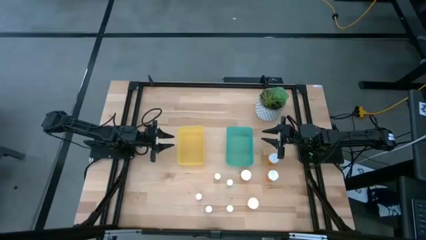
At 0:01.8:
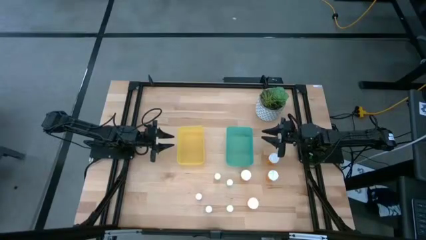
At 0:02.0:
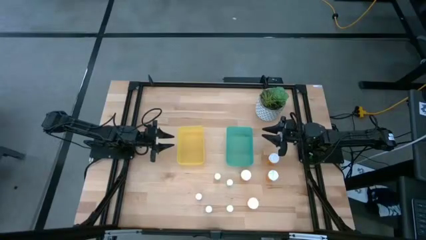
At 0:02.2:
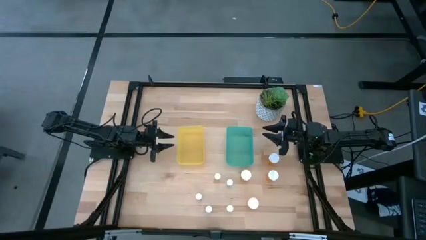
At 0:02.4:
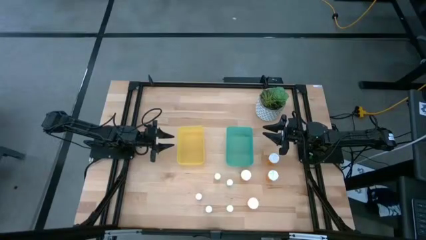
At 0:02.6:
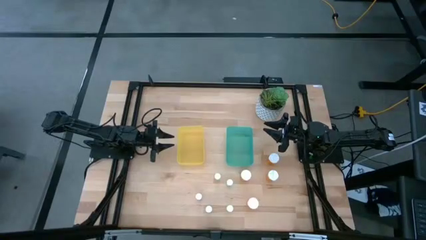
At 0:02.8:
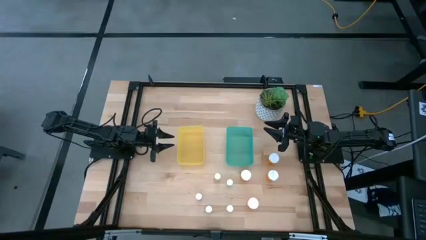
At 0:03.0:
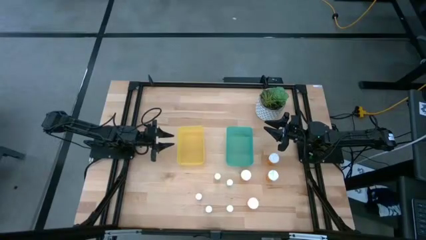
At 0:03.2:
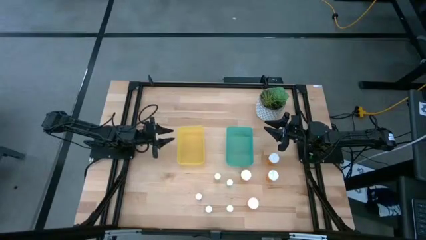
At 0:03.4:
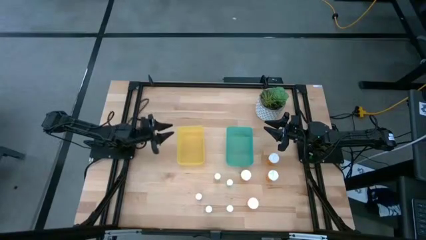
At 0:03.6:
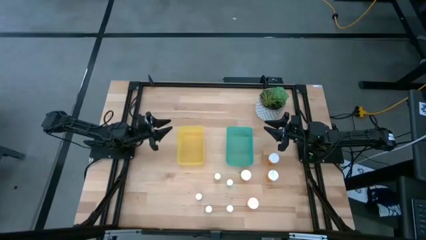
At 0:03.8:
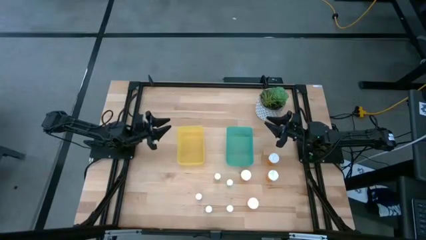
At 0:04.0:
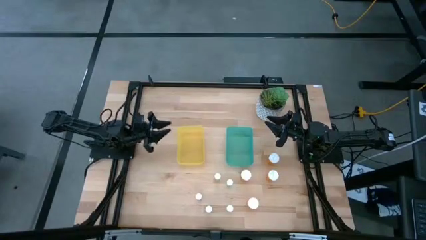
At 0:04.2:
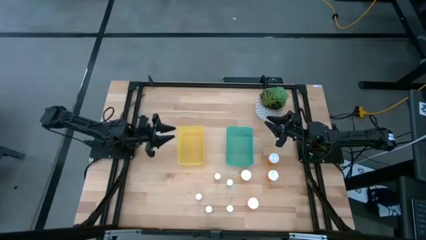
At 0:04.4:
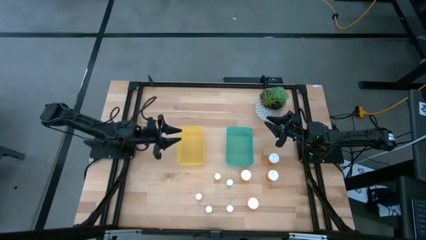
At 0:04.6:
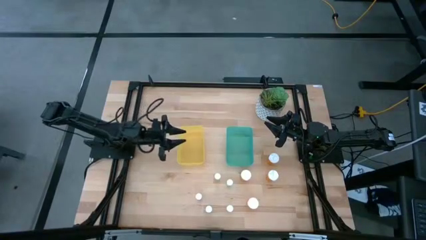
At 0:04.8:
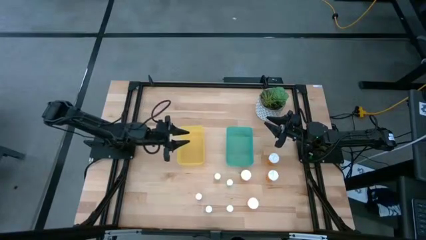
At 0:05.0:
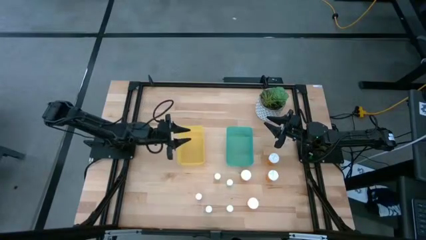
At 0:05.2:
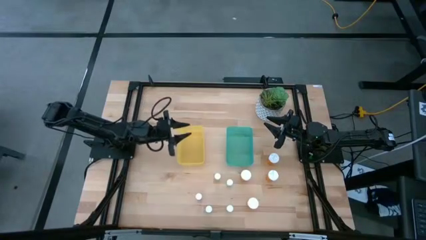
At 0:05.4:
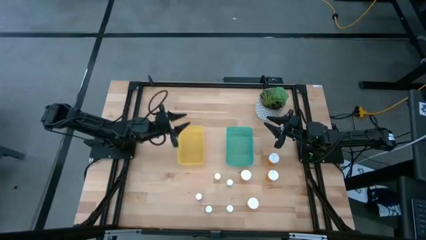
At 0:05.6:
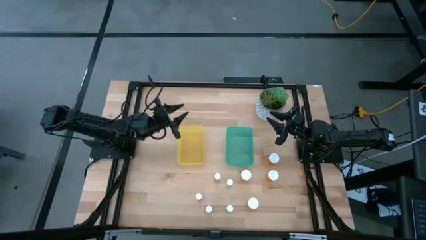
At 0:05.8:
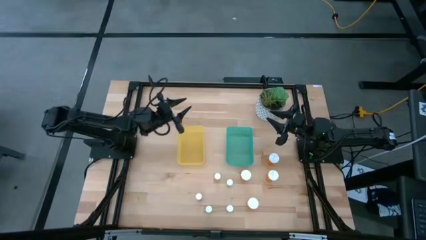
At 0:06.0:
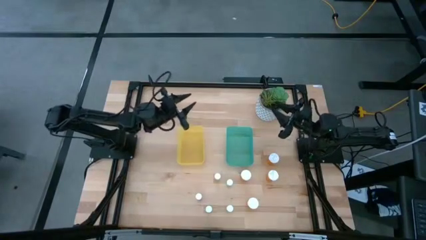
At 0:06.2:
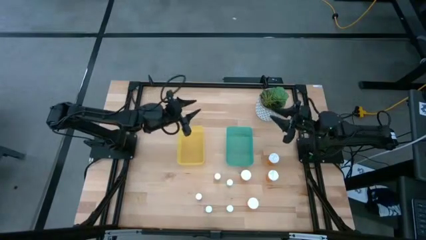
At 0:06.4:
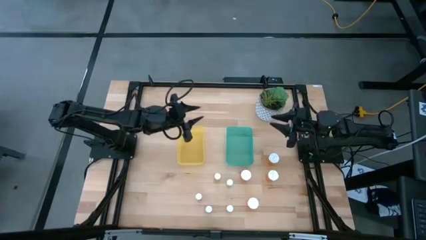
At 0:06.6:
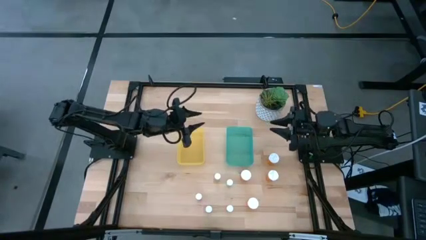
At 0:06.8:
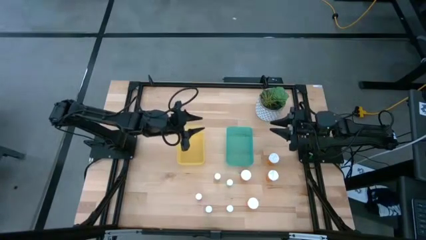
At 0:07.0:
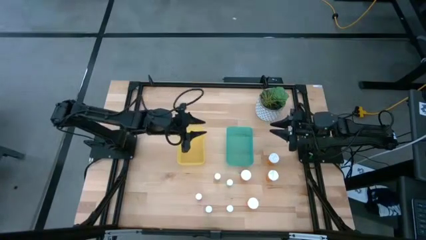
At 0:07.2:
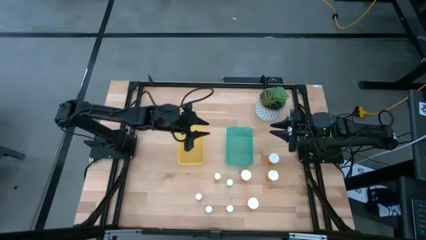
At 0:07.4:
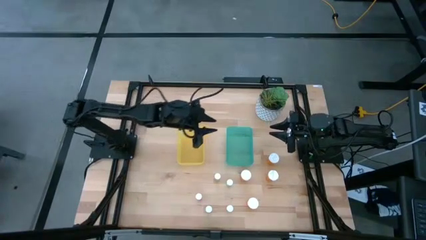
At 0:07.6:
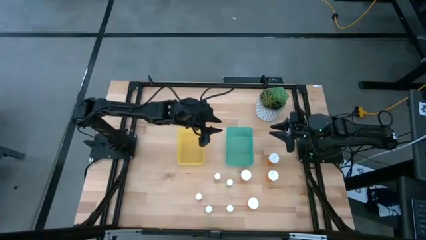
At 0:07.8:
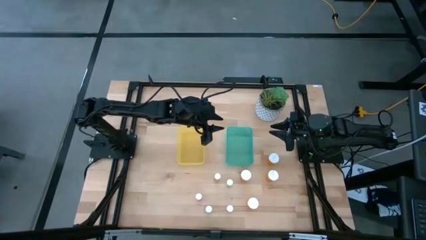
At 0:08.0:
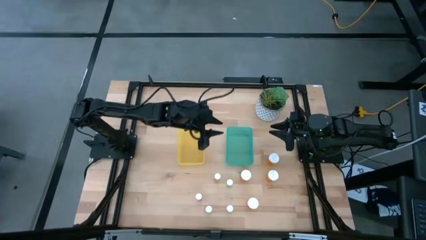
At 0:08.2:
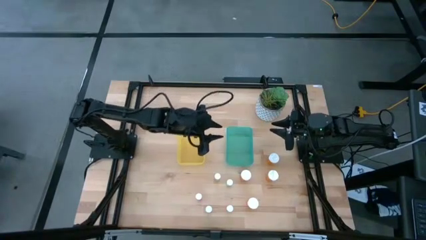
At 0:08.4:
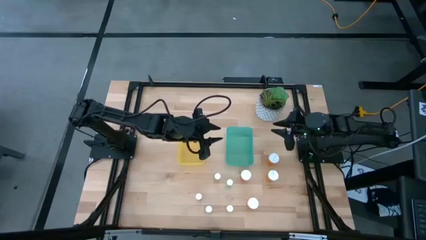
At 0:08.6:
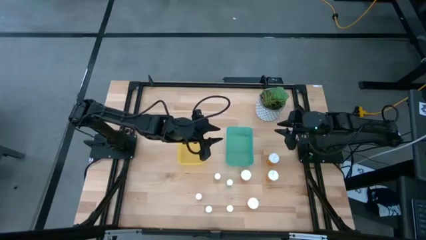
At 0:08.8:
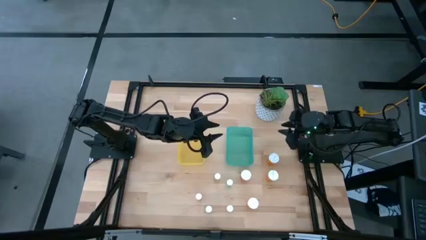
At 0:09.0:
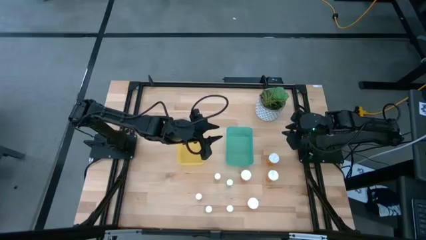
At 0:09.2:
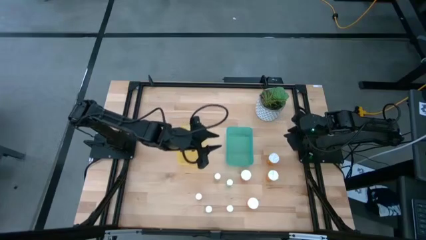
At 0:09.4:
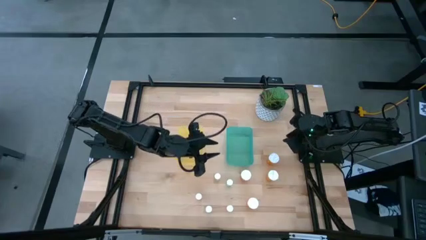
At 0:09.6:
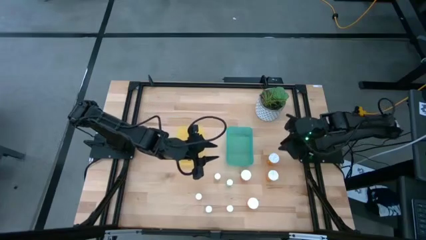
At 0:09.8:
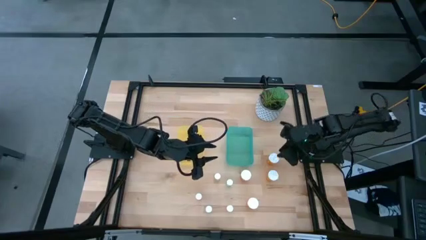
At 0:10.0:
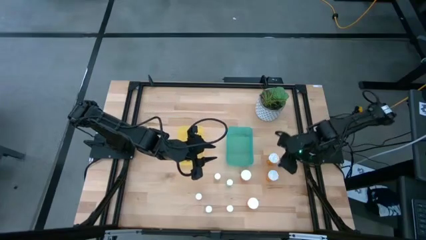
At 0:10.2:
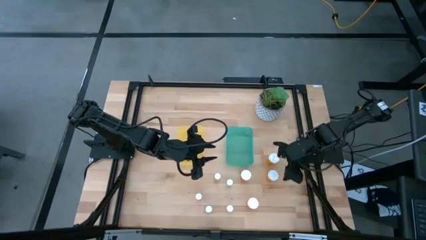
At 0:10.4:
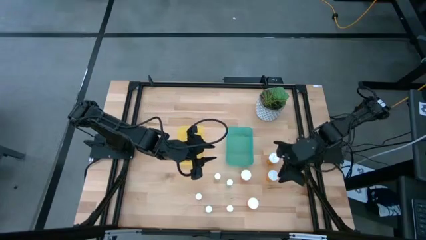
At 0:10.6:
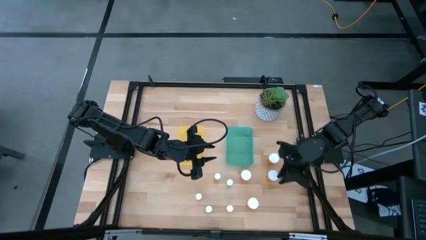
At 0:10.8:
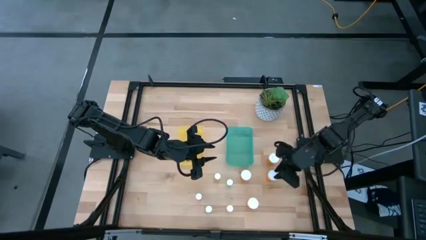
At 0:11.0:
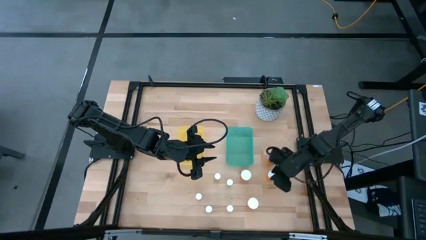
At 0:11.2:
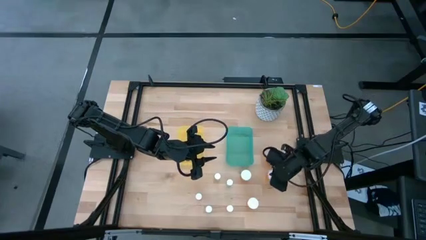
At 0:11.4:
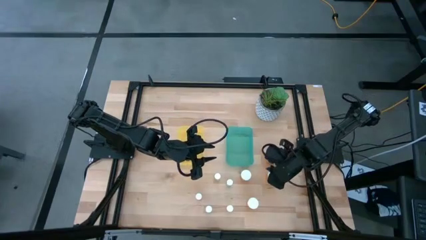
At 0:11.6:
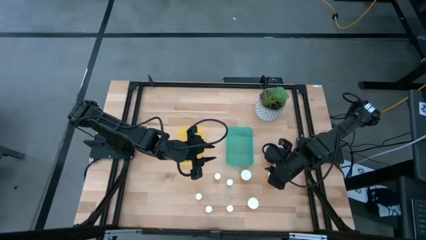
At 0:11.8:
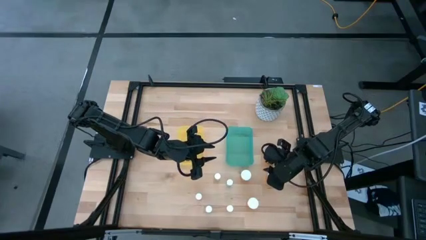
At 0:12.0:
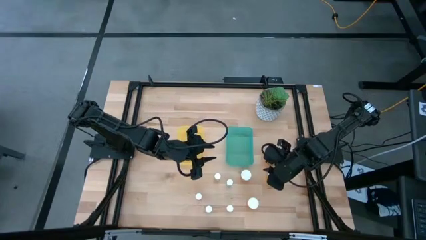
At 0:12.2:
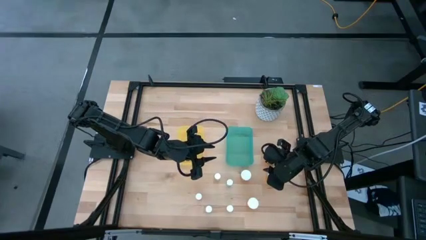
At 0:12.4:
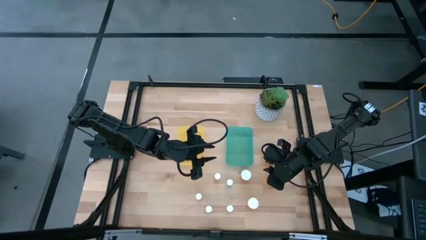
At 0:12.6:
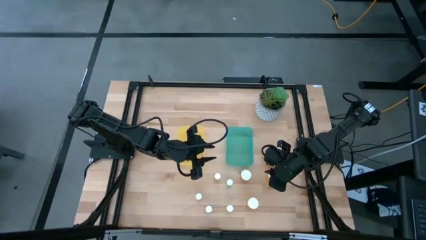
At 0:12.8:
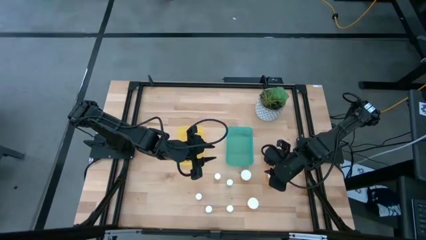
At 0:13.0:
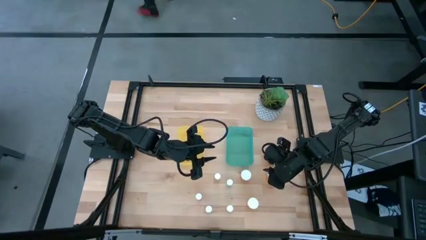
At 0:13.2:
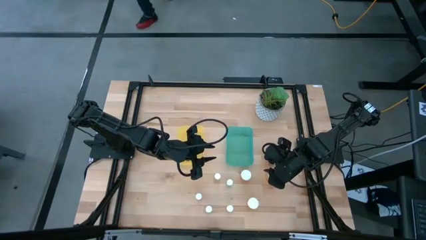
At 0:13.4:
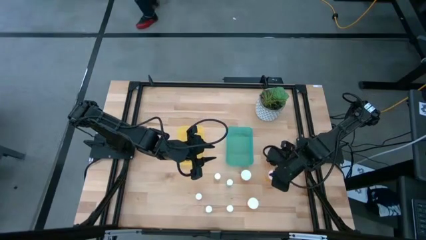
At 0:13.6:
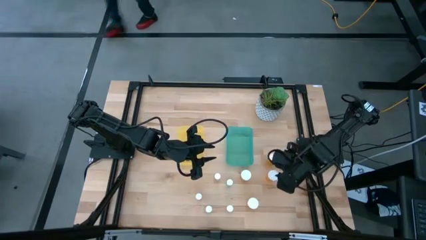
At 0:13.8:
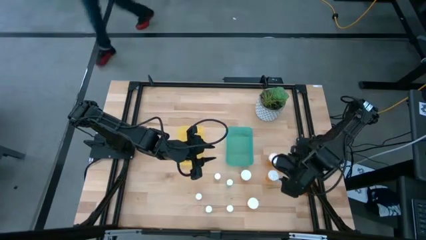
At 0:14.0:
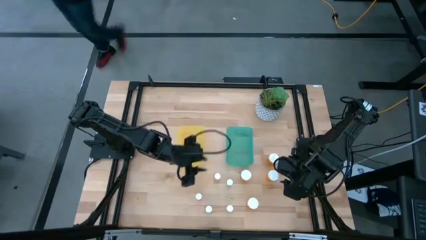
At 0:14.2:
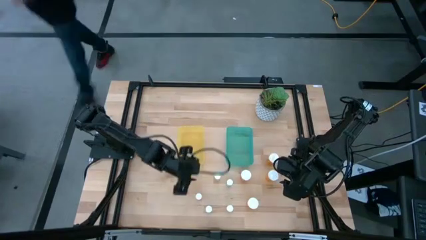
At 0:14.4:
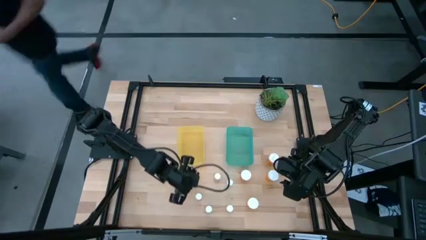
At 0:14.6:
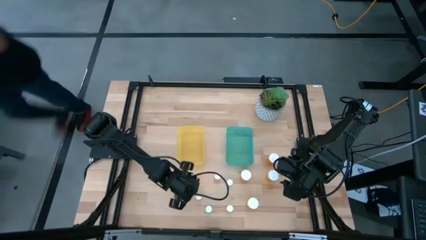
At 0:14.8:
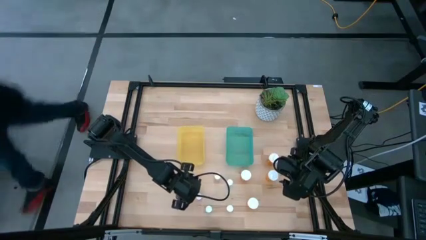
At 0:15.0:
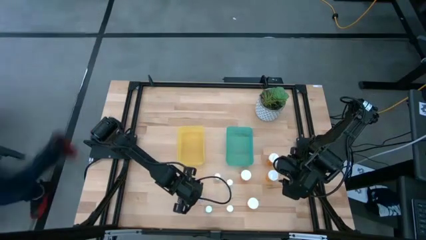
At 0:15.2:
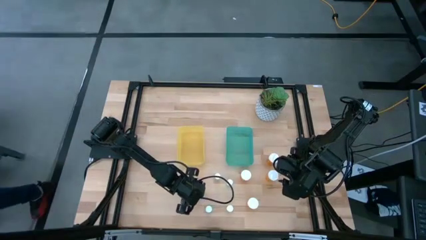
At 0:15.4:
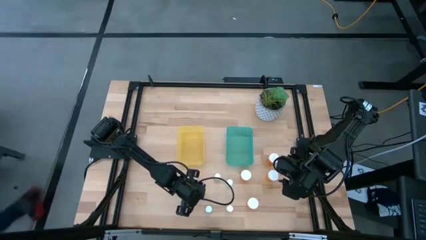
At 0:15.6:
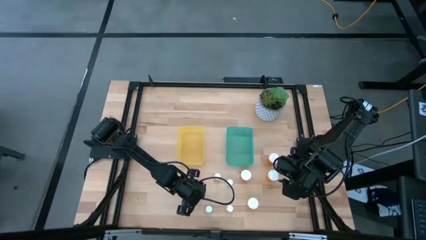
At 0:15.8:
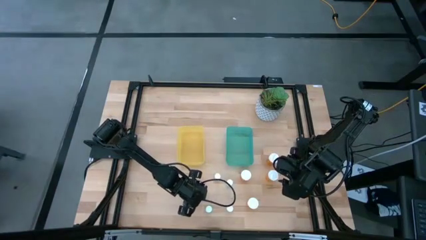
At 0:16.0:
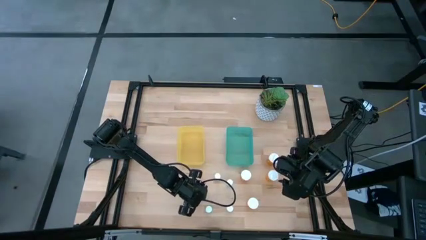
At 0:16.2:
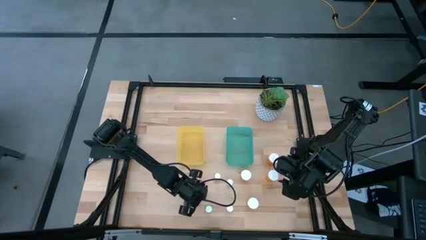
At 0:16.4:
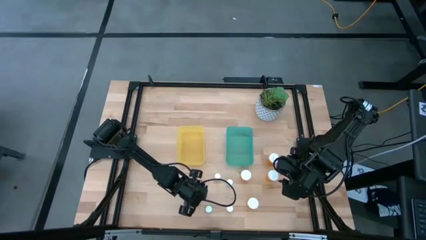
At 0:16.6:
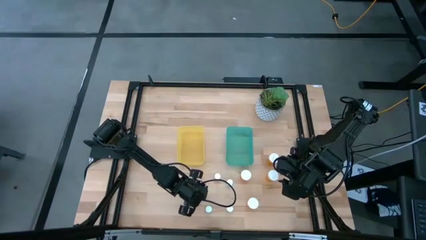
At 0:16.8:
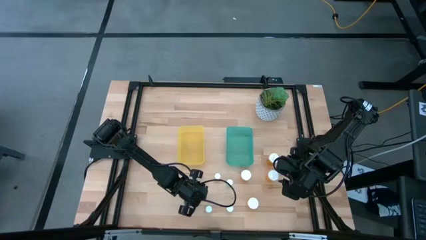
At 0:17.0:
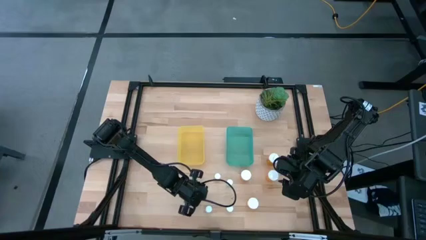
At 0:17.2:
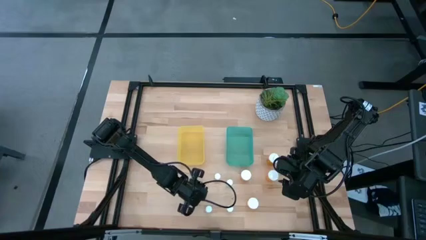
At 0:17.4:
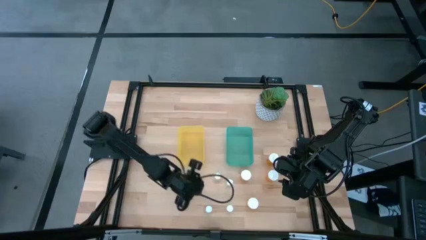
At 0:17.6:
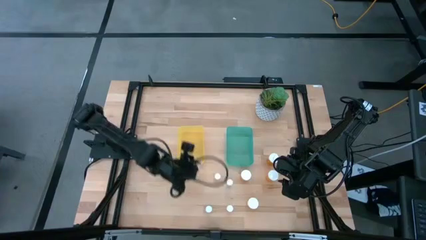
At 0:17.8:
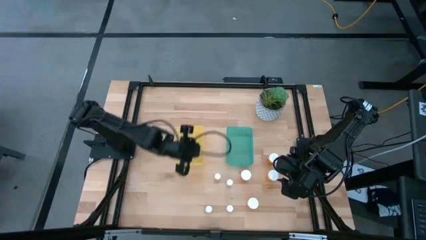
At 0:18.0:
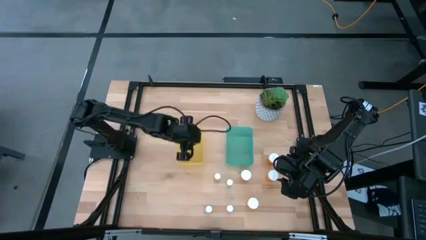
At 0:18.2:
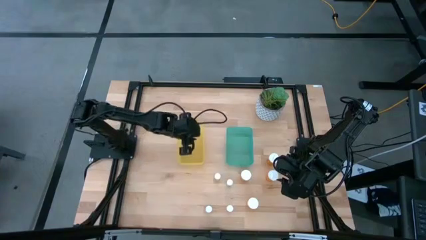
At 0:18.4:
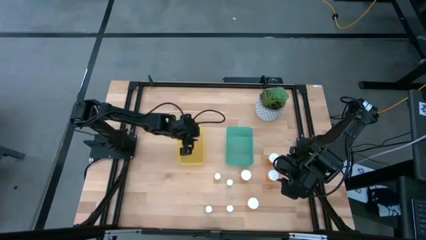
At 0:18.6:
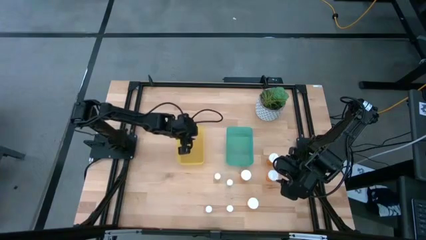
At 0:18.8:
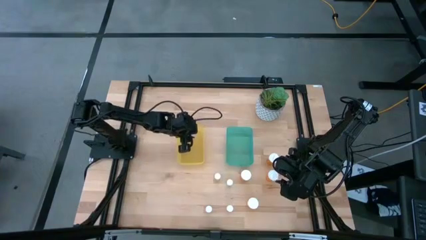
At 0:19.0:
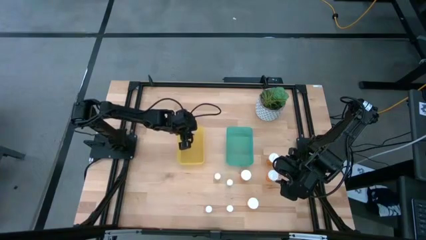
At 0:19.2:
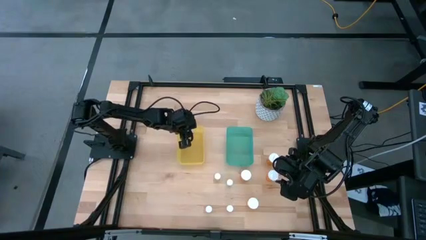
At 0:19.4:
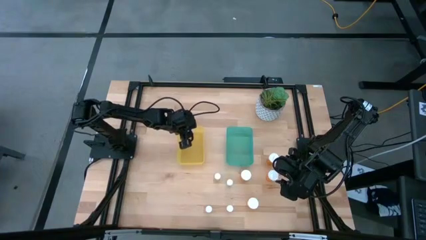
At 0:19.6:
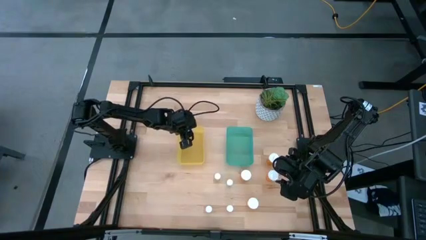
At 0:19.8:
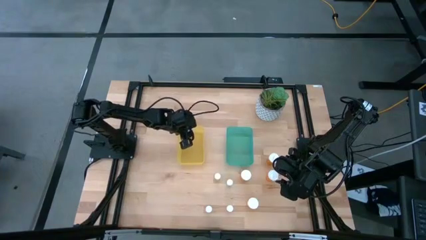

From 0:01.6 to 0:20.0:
Task: Pick and place medicine bottles into bin by pill shape (circle, oval)
Put the small pink pill bottle into the yellow bin
